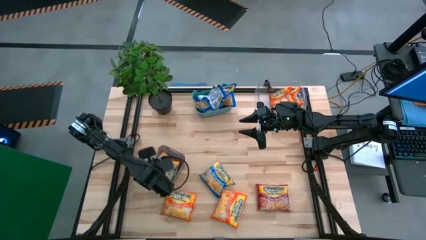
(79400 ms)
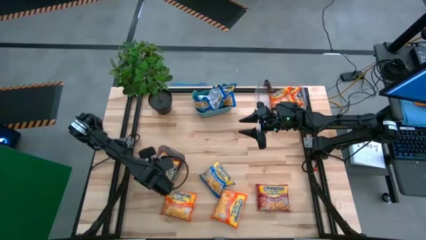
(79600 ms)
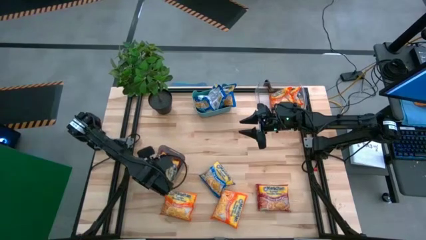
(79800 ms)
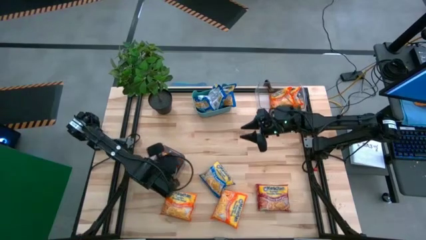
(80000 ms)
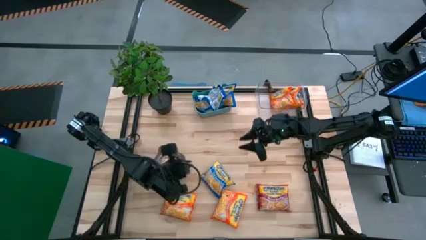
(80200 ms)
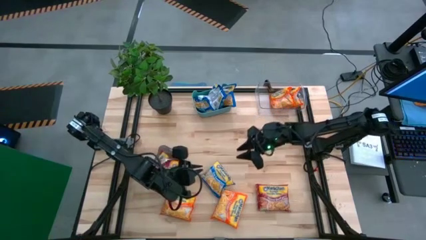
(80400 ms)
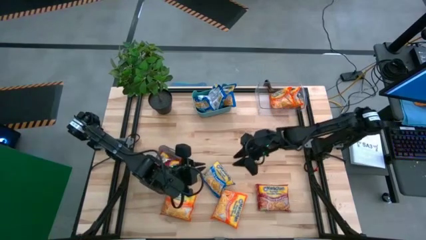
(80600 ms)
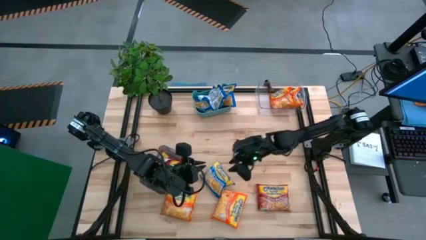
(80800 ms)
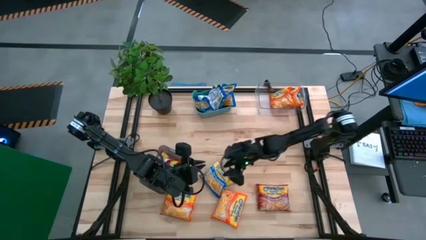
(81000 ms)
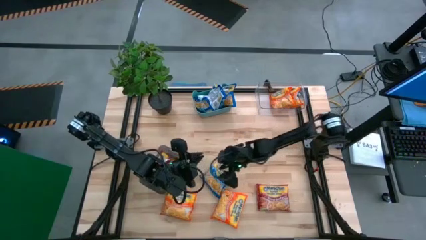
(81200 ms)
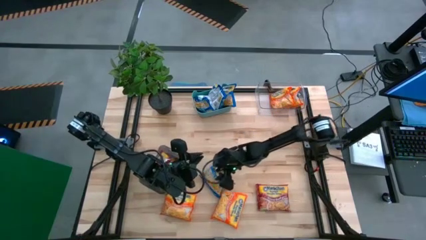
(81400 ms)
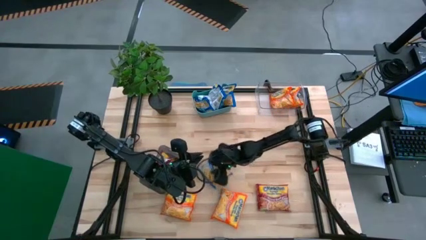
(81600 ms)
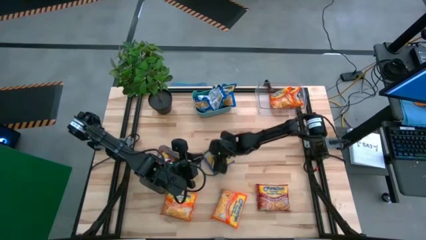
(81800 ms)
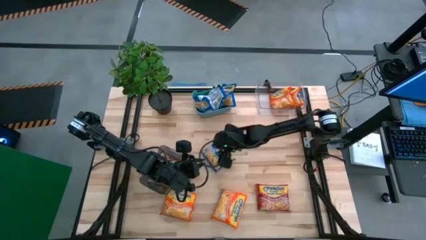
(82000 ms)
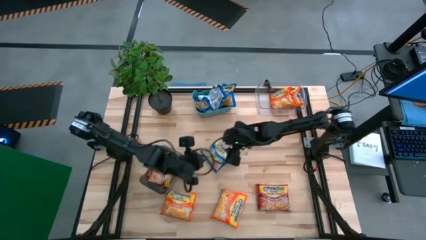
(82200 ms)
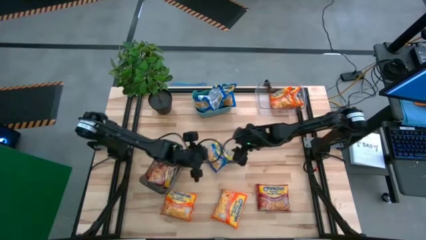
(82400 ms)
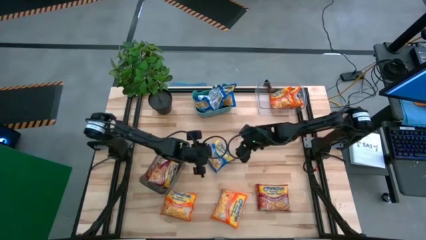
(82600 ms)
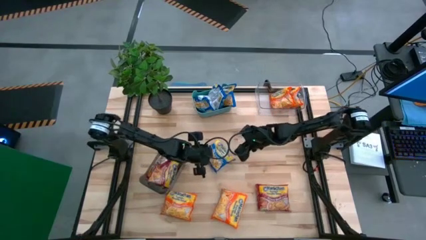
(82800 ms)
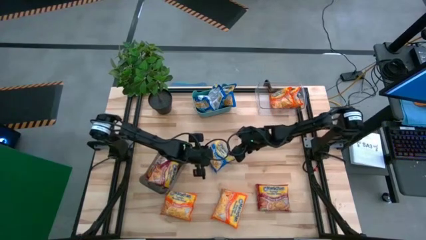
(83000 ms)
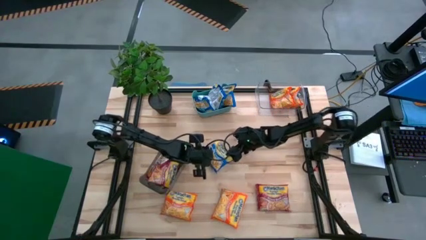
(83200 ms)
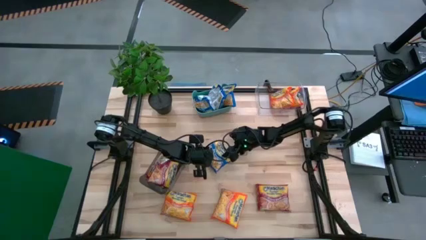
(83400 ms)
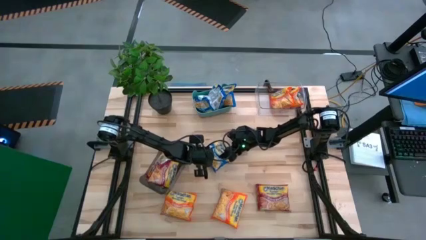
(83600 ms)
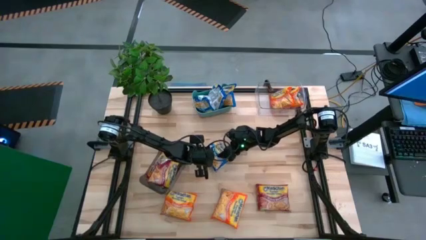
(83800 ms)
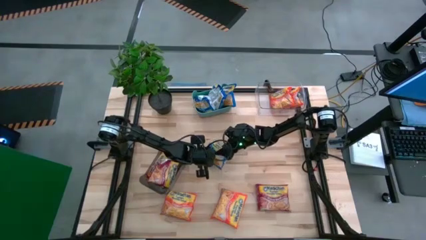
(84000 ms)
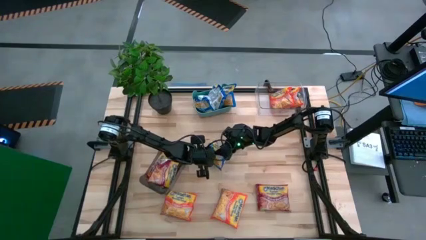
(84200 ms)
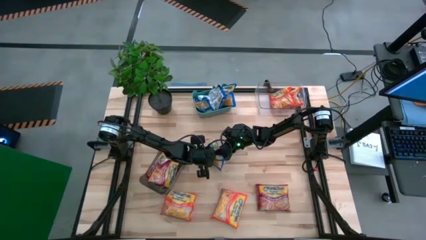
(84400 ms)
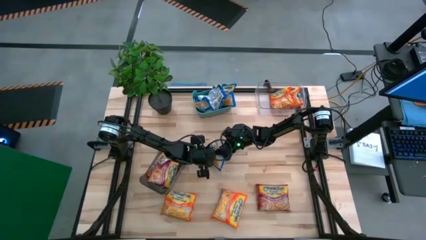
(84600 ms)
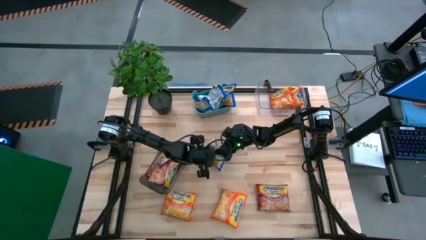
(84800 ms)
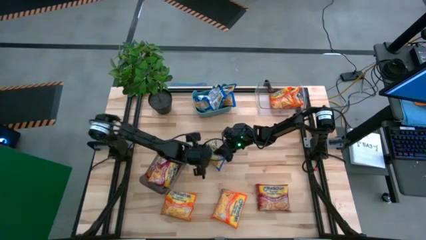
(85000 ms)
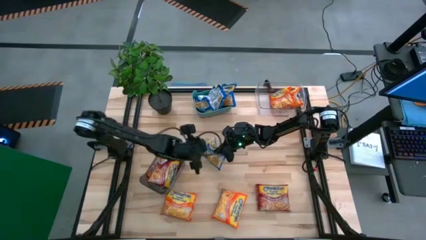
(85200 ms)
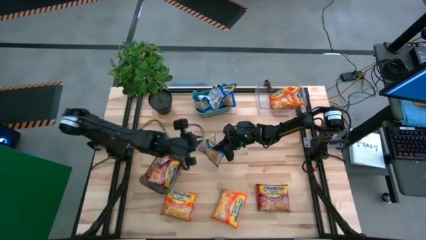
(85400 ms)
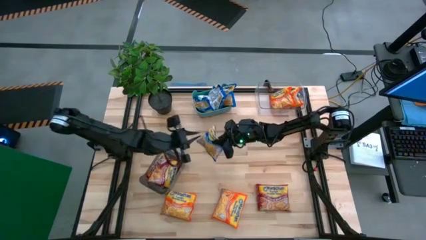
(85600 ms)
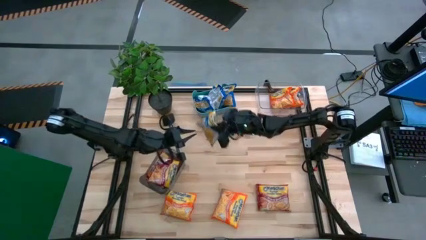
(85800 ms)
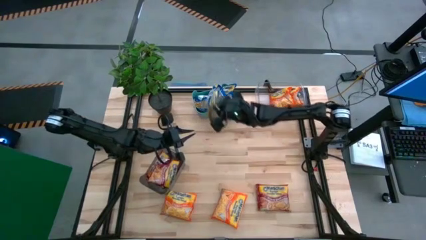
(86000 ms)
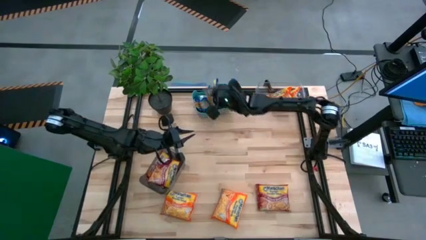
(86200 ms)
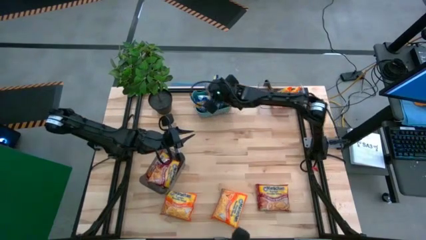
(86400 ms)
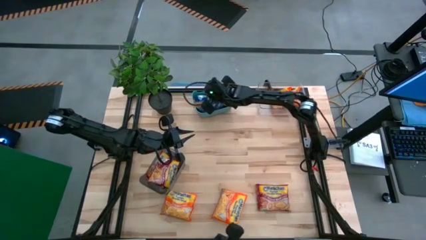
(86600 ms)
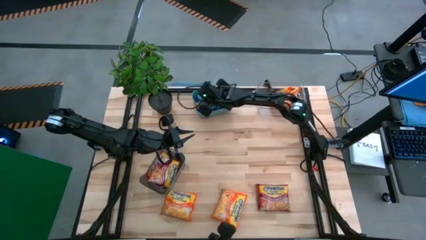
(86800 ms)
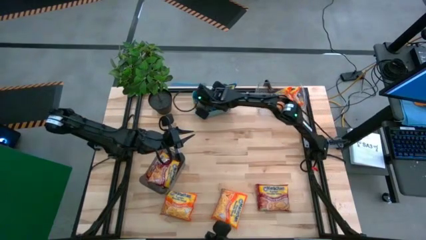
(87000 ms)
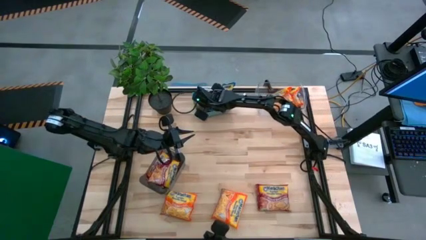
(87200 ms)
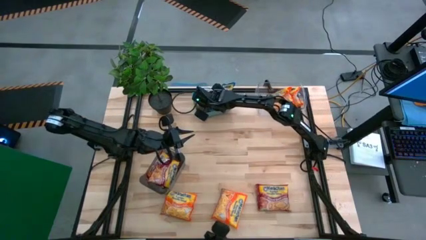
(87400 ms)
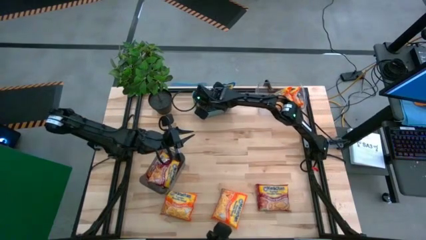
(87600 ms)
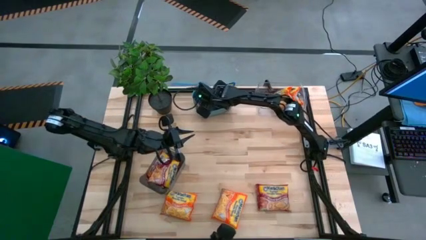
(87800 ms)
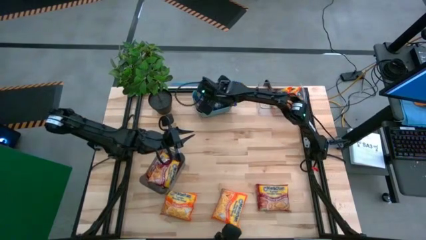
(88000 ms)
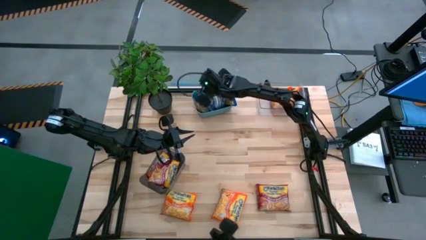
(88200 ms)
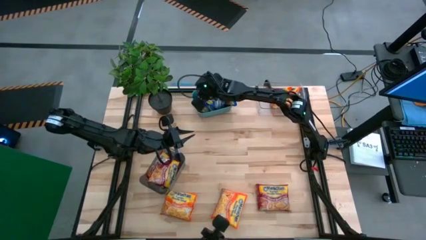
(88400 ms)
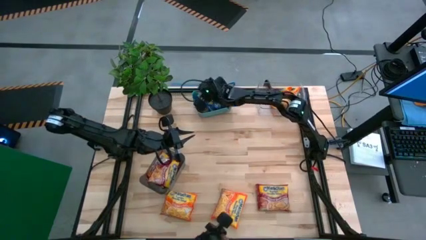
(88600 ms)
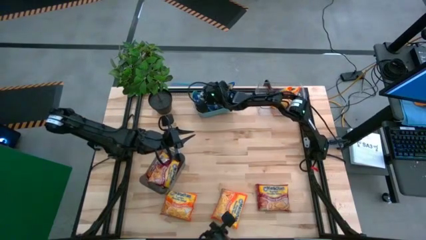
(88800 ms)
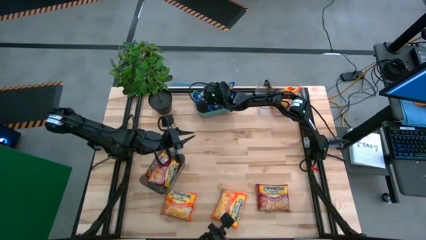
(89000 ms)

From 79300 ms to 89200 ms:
Task: Sort Maruchan noodles
Put the blue noodle pack into the green bin

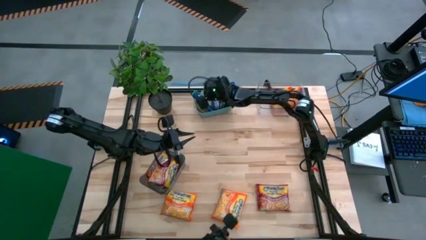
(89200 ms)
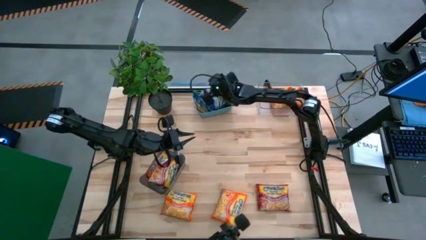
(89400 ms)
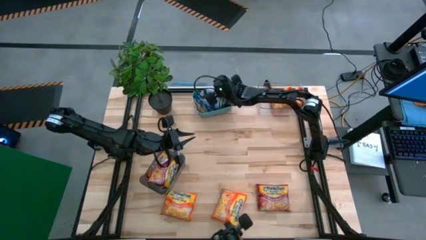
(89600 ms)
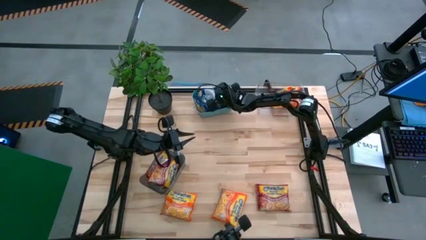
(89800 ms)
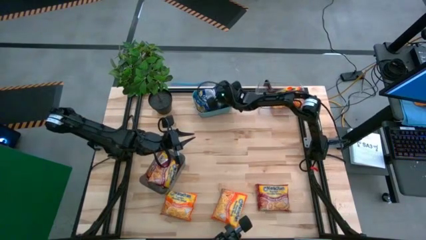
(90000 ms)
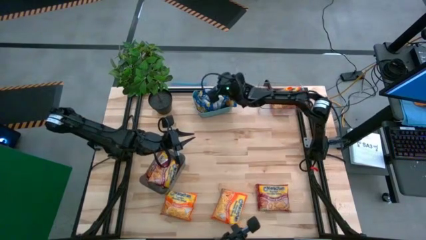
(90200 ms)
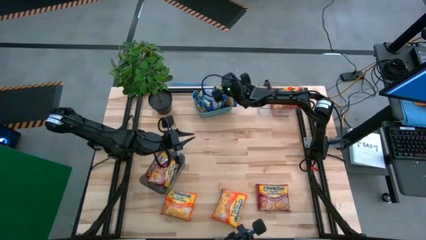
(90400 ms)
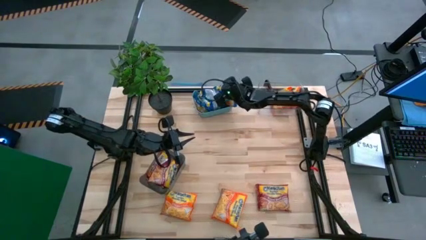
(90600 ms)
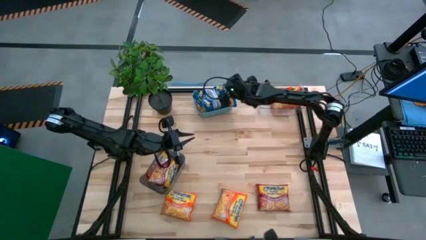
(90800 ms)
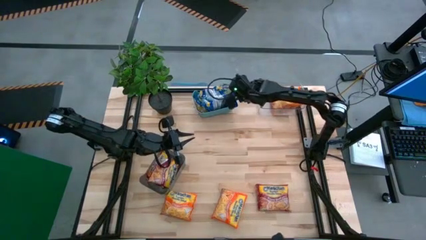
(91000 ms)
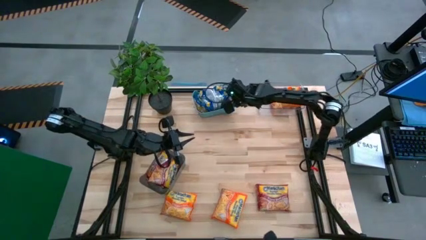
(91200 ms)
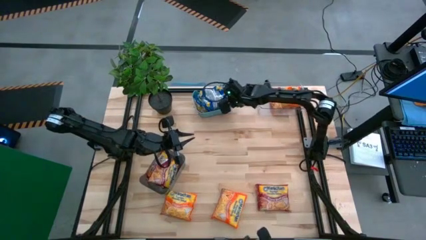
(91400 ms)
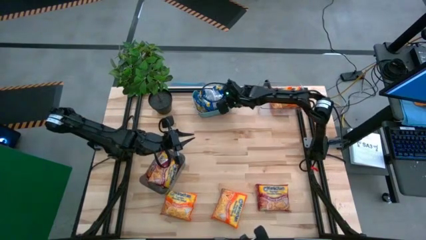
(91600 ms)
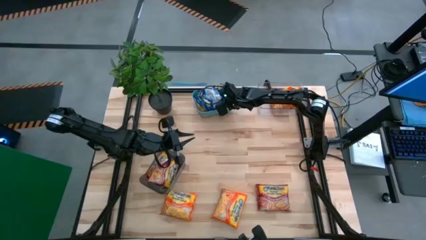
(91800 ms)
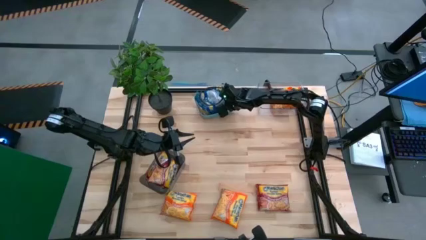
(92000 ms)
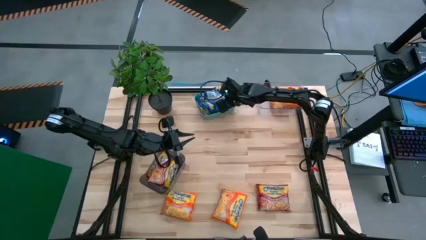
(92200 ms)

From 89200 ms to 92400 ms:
Adjust the blue noodle packs in the green bin

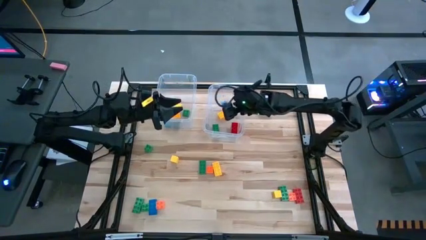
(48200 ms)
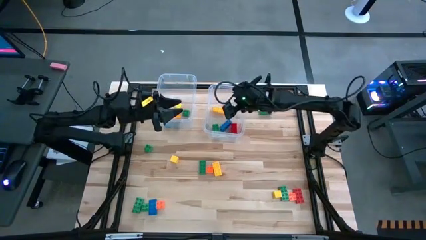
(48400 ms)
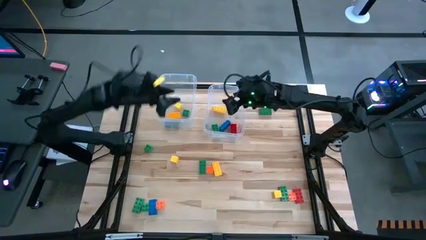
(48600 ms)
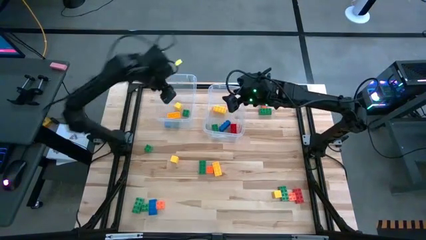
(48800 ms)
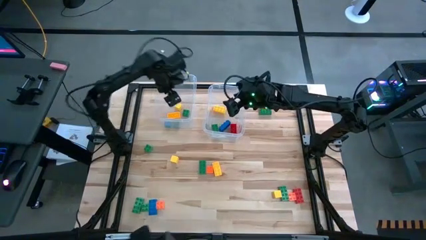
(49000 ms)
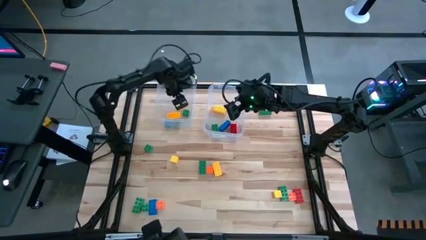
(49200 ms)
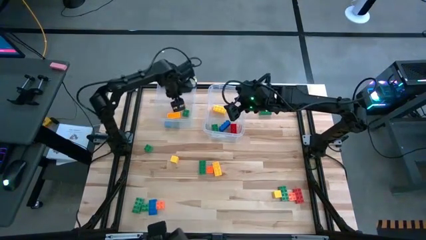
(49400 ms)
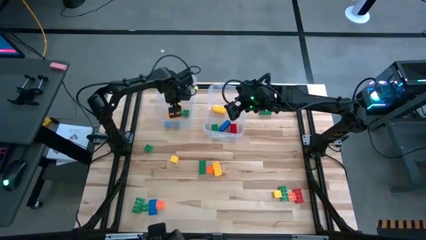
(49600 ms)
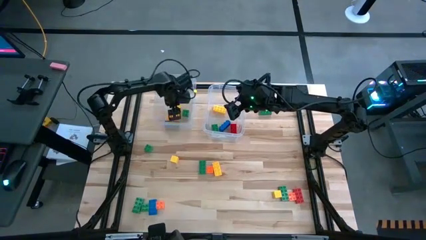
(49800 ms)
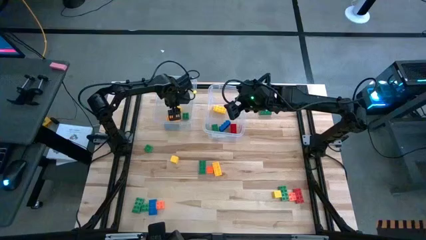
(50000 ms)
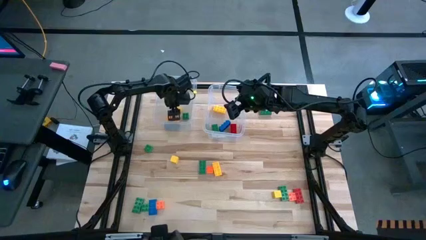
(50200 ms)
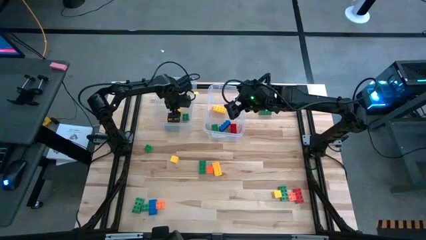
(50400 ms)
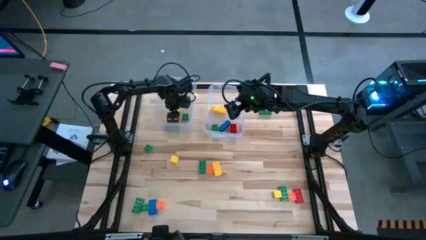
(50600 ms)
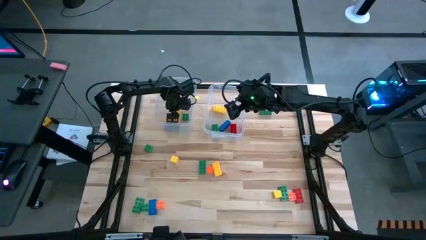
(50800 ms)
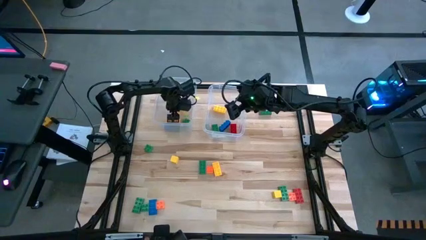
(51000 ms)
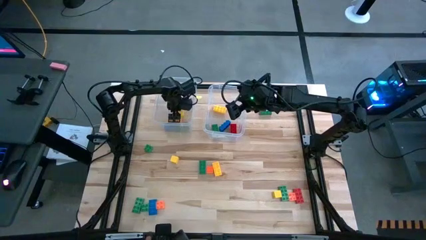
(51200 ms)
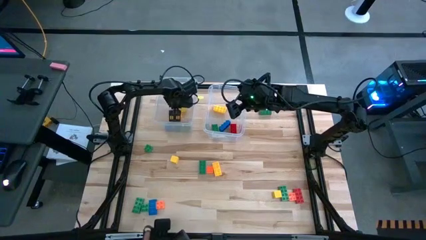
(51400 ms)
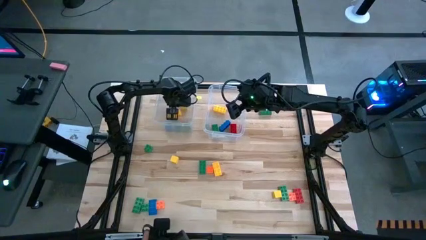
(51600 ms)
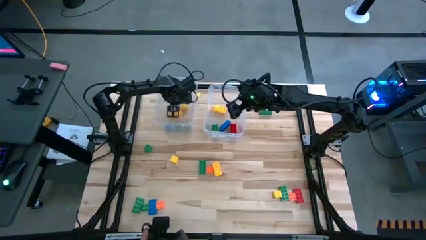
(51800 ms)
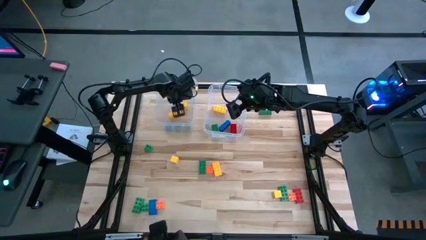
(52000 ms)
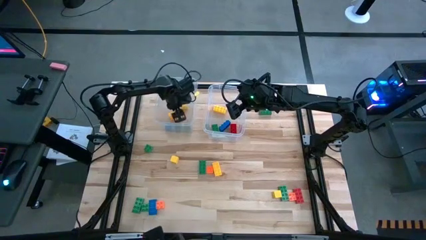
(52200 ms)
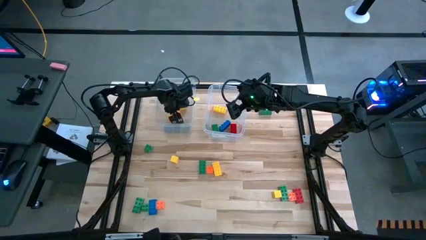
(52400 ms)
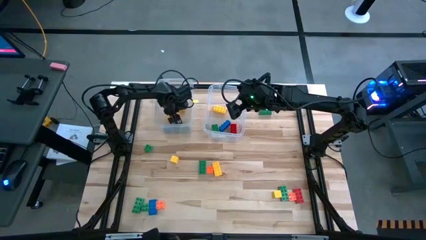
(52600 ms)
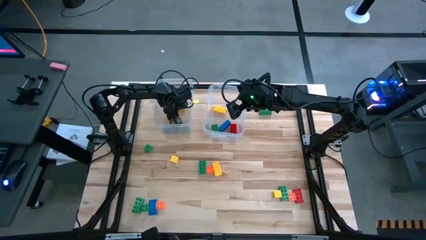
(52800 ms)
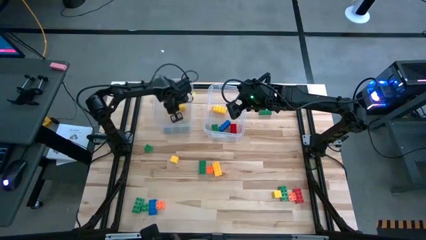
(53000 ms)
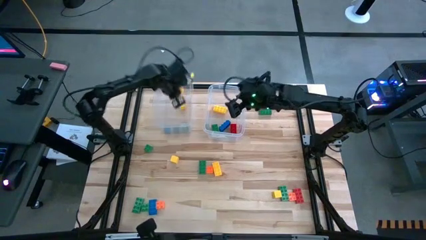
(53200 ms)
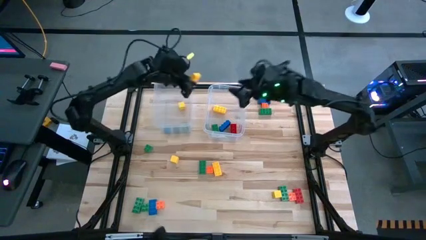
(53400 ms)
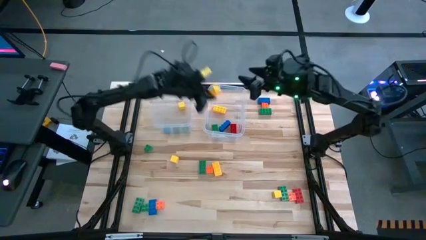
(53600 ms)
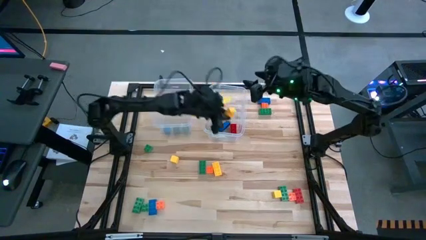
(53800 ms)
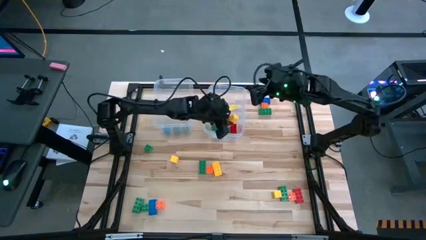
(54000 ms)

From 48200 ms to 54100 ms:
Task: Sort blocks by size
Put the yellow big game piece into the right transparent bin
